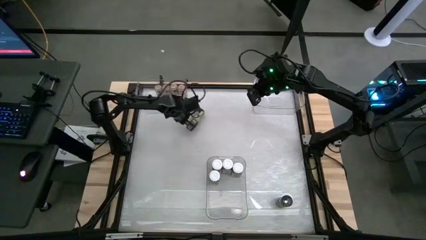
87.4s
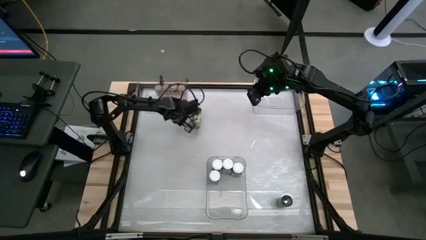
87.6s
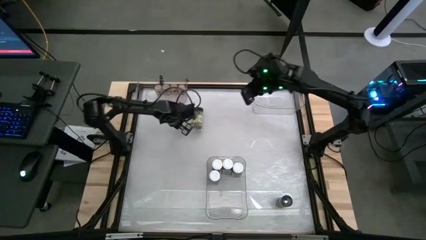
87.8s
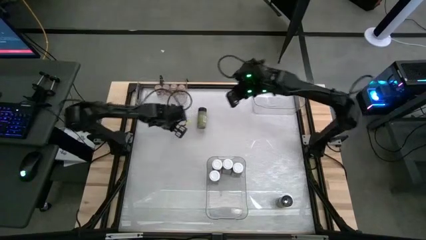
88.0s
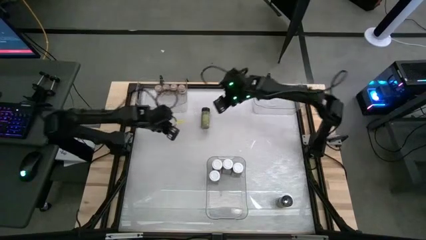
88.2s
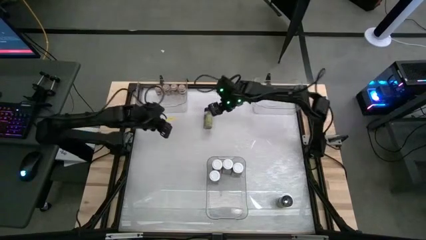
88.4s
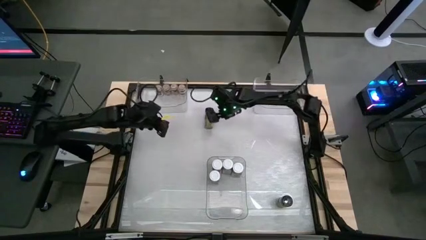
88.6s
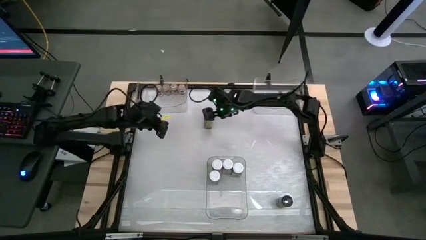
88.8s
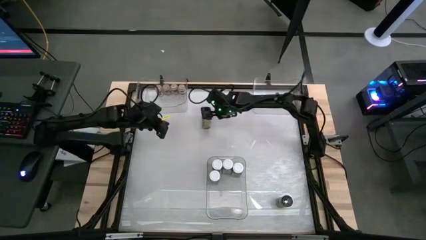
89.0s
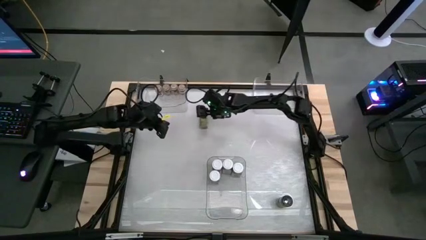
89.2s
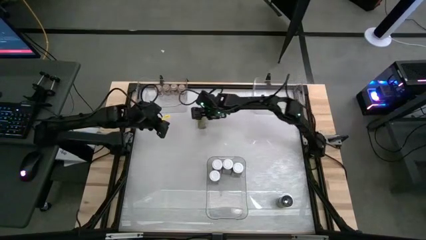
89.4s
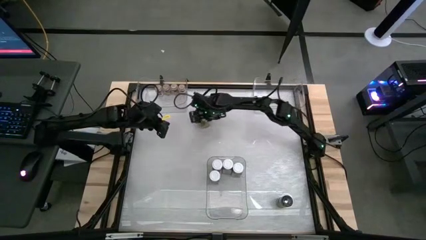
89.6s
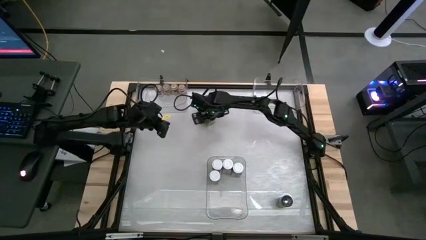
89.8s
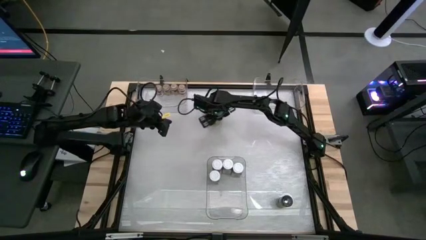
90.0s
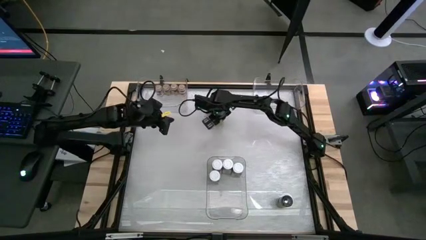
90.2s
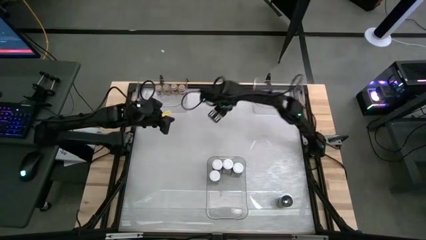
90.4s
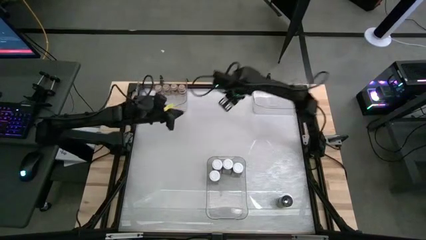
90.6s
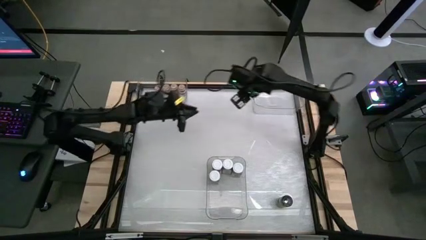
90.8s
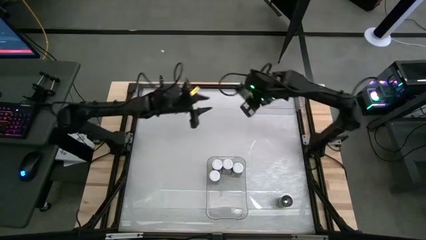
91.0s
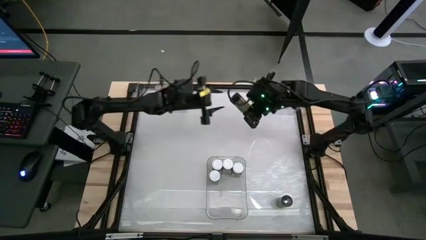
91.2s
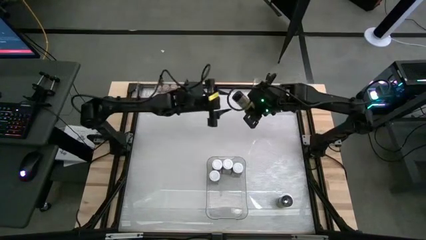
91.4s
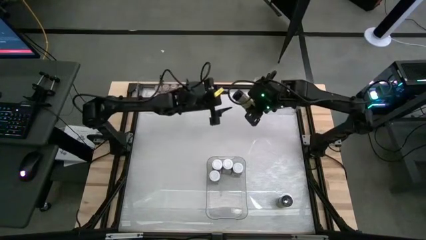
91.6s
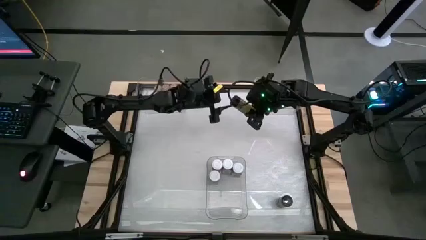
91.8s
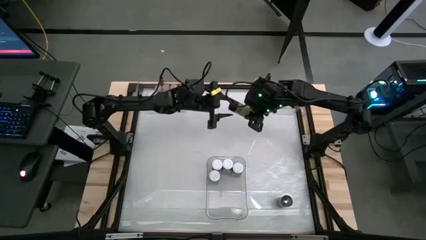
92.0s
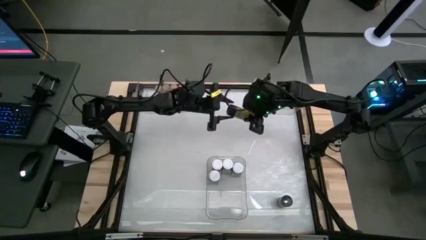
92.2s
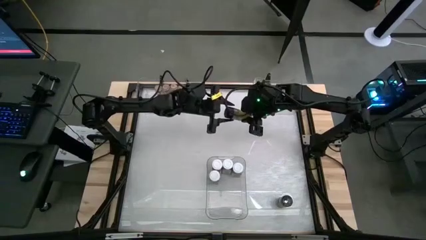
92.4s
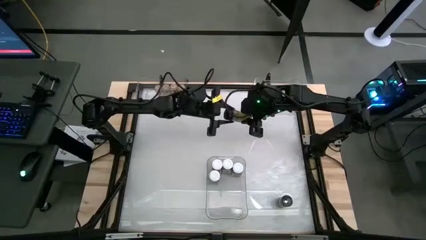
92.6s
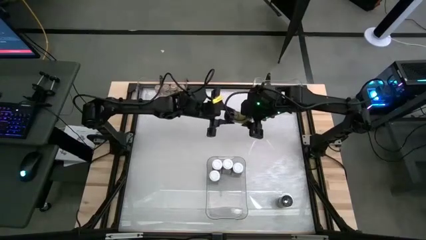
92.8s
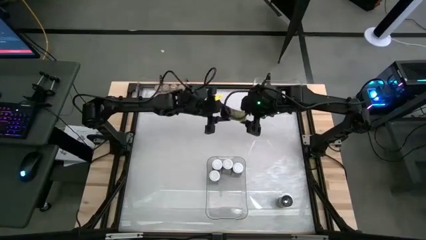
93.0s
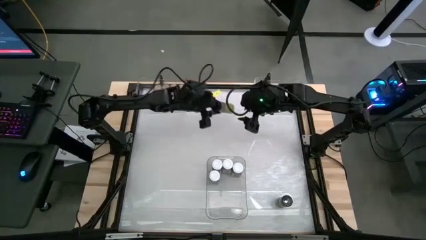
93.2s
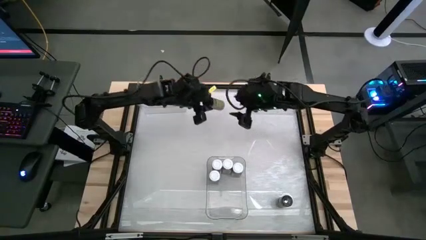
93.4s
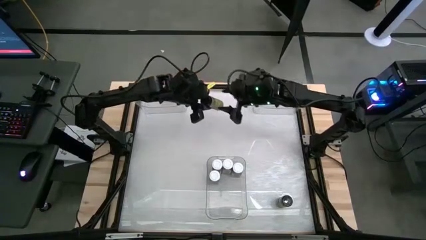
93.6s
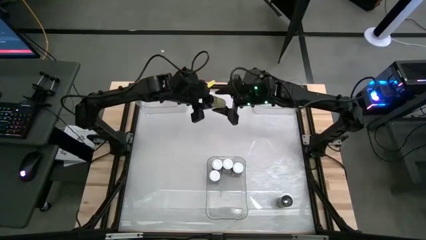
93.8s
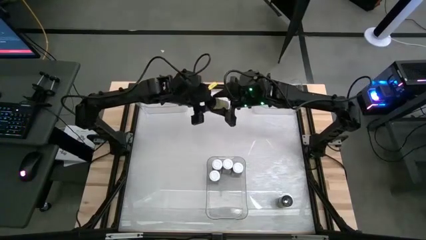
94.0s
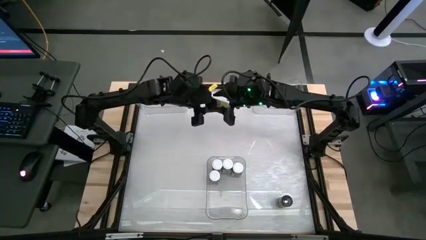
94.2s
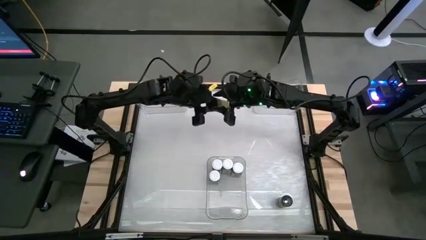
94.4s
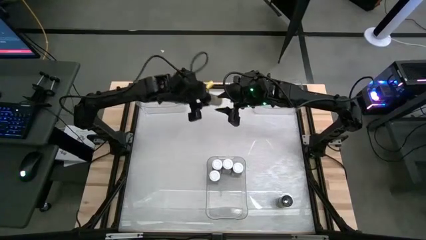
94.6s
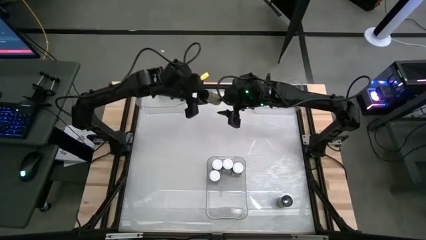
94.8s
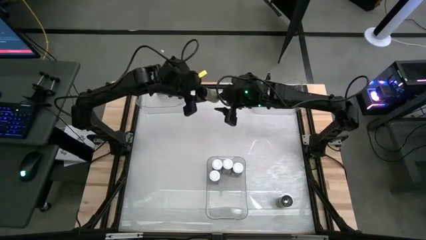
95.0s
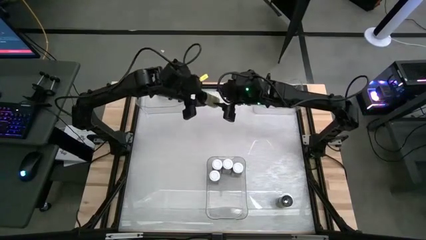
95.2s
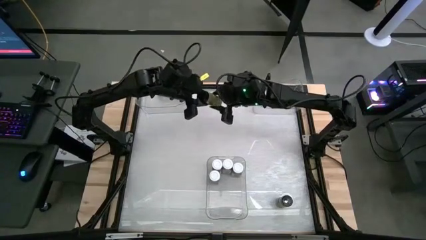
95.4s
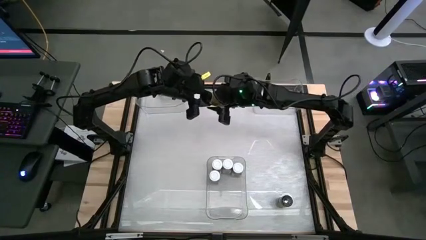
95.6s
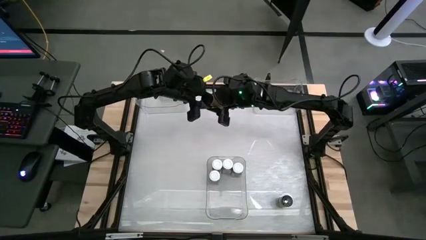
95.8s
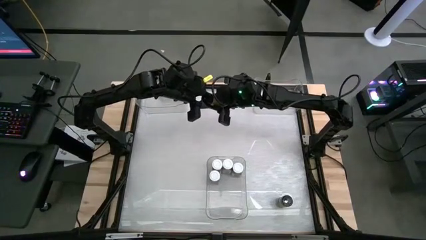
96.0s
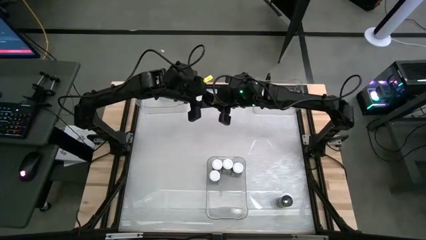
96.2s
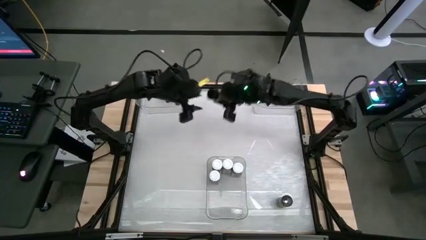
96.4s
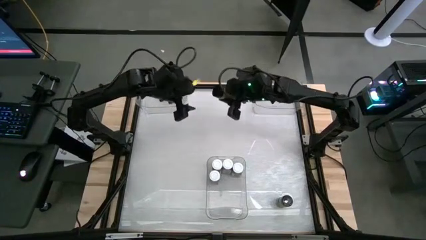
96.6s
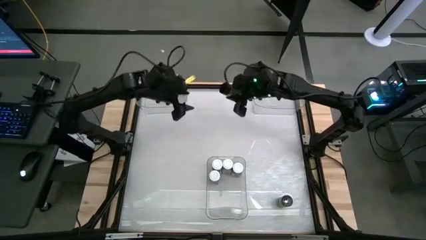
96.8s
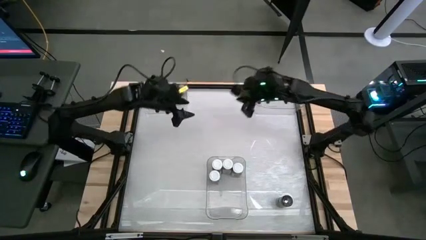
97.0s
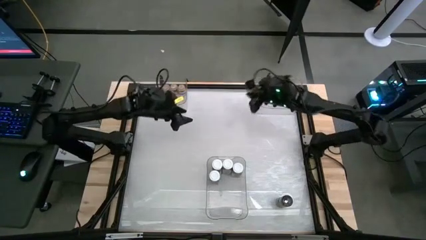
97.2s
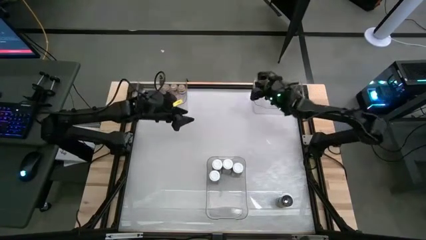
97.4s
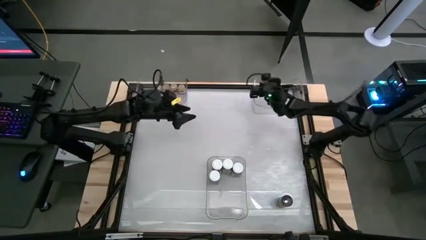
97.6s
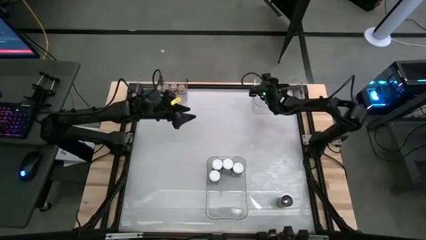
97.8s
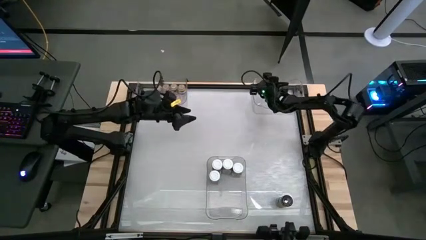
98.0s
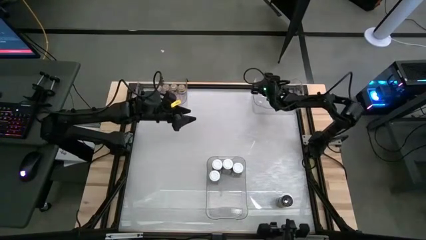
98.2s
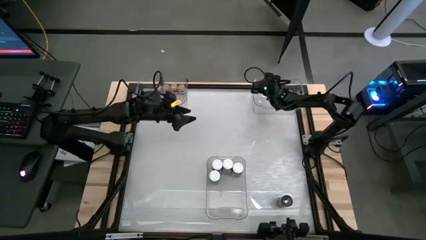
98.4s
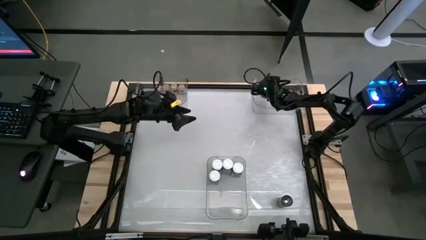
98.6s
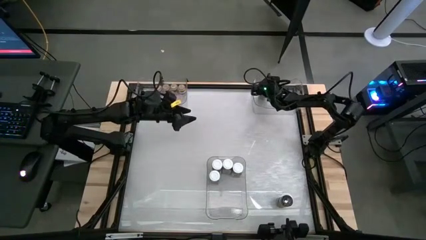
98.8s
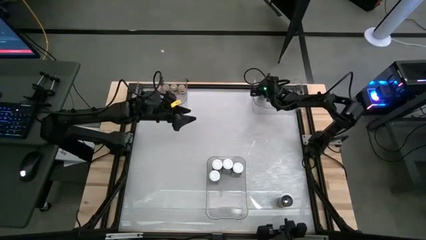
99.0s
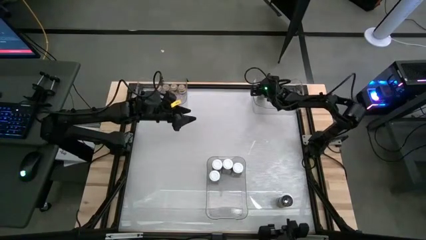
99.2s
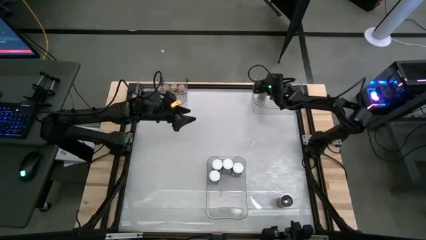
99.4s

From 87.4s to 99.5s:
Task: Sort spices by type
Put the top black seasoning bottle into the top right transparent bin
